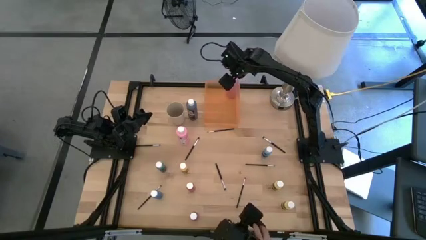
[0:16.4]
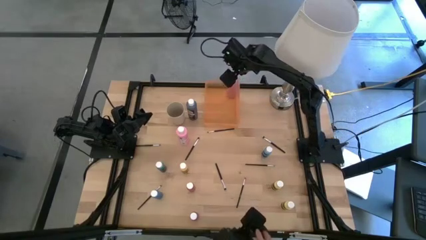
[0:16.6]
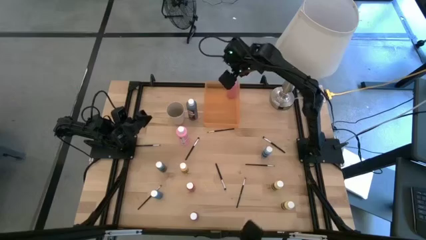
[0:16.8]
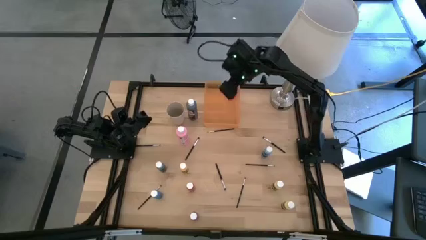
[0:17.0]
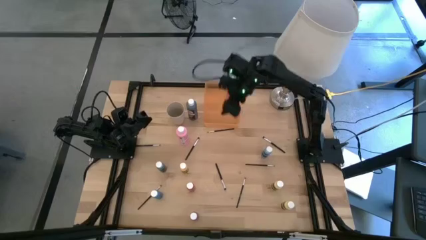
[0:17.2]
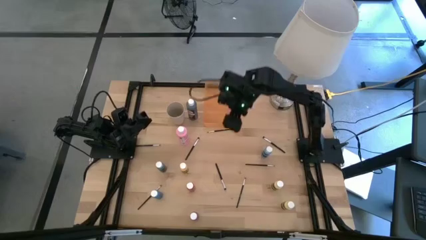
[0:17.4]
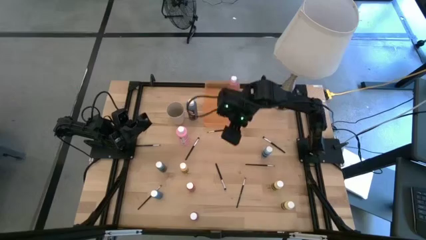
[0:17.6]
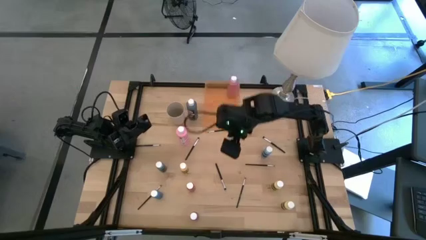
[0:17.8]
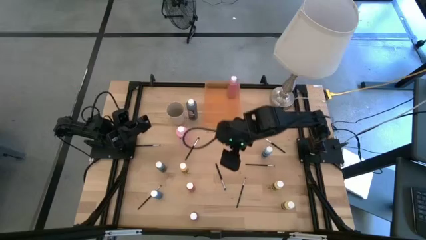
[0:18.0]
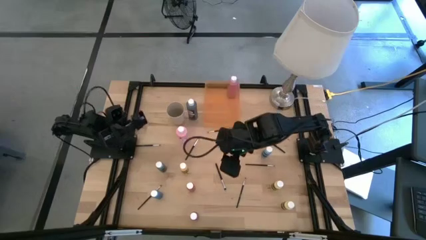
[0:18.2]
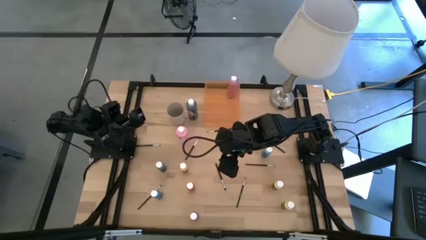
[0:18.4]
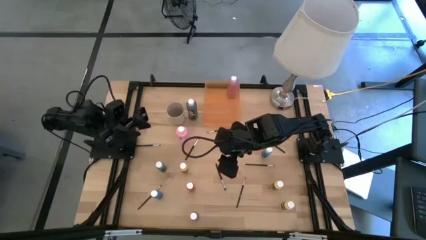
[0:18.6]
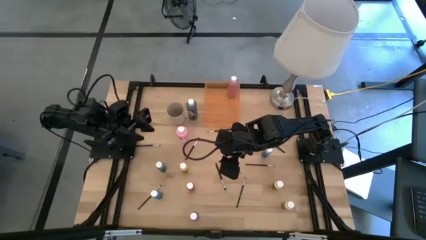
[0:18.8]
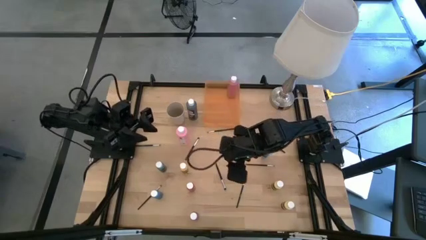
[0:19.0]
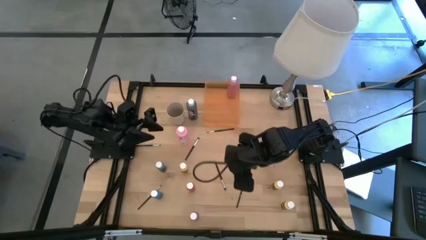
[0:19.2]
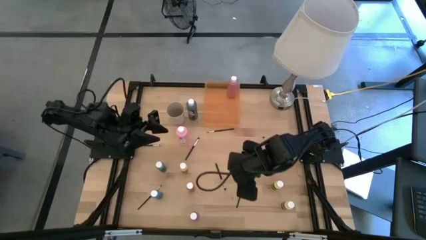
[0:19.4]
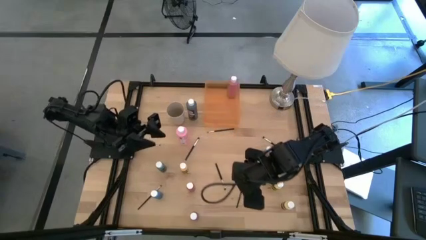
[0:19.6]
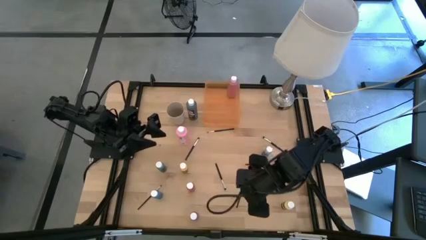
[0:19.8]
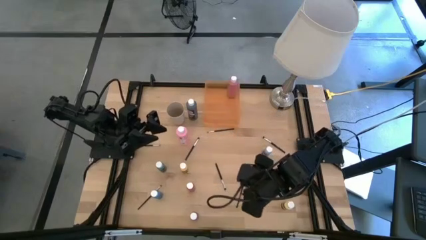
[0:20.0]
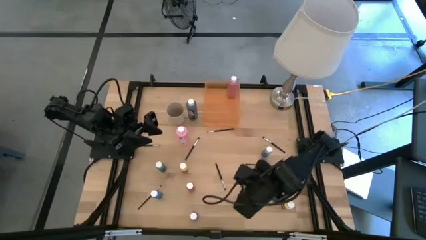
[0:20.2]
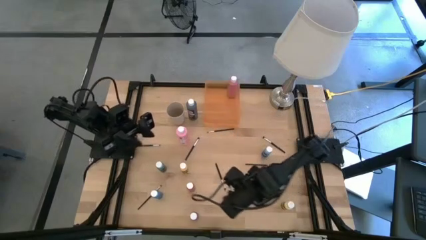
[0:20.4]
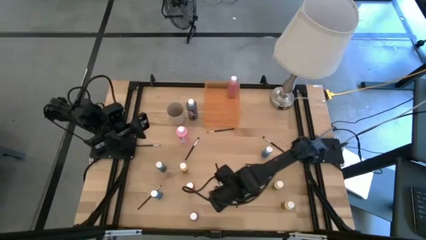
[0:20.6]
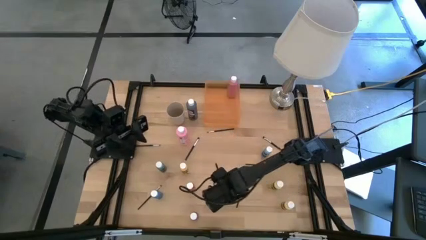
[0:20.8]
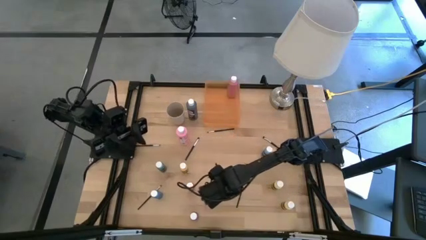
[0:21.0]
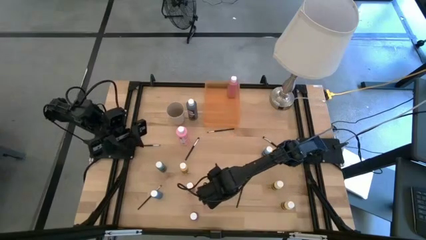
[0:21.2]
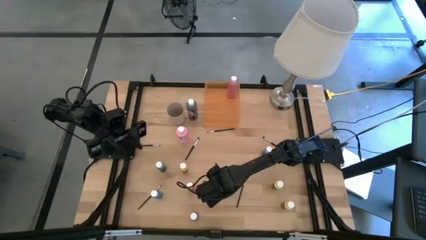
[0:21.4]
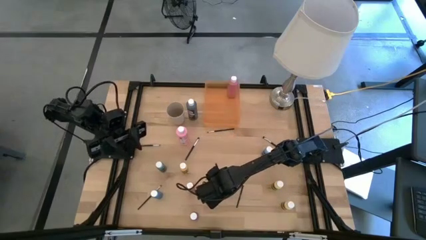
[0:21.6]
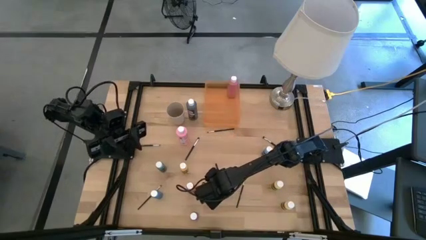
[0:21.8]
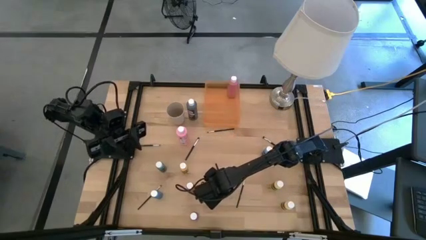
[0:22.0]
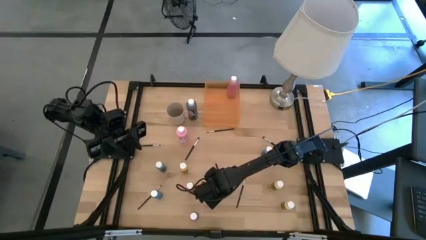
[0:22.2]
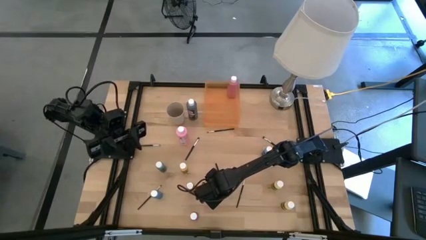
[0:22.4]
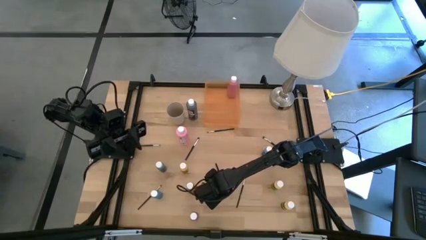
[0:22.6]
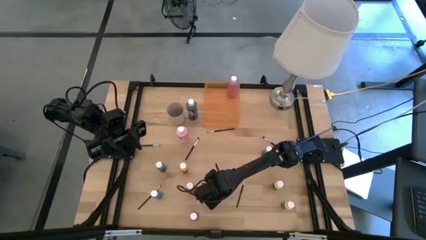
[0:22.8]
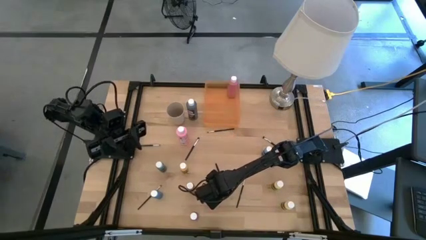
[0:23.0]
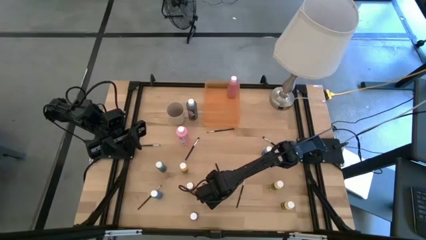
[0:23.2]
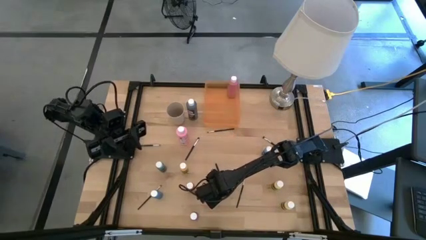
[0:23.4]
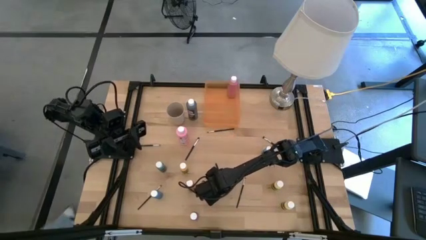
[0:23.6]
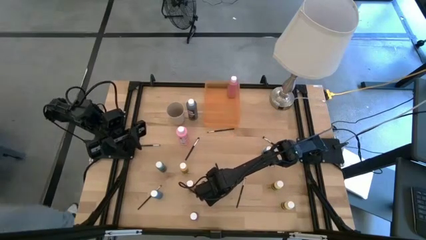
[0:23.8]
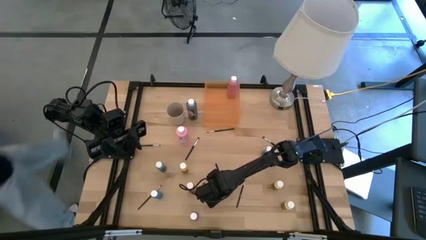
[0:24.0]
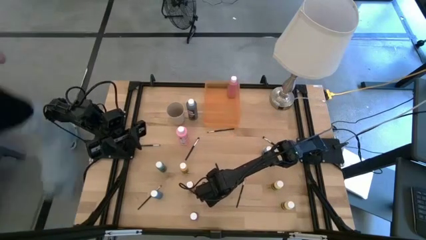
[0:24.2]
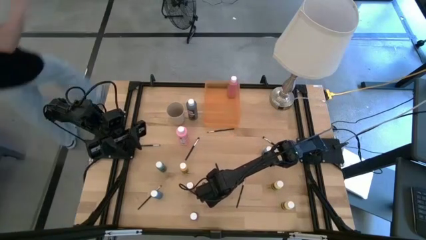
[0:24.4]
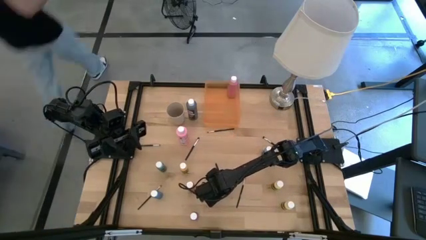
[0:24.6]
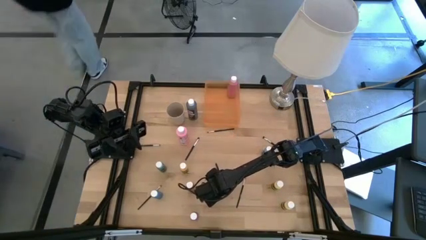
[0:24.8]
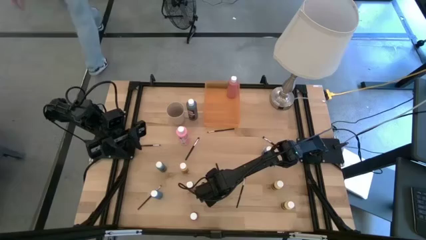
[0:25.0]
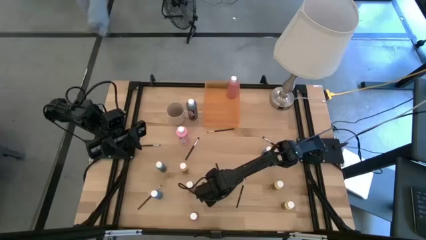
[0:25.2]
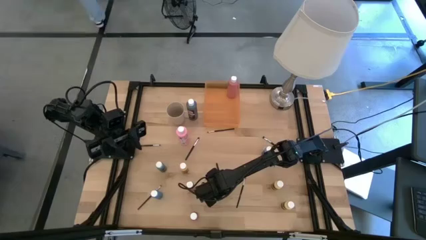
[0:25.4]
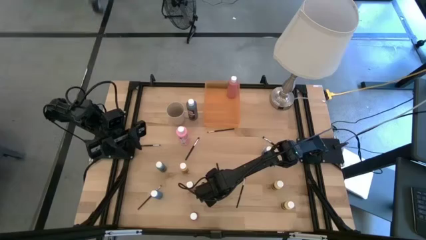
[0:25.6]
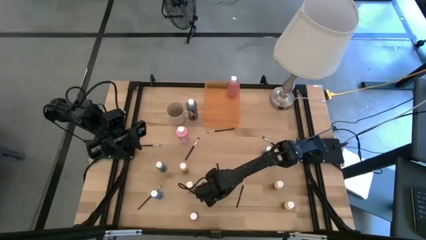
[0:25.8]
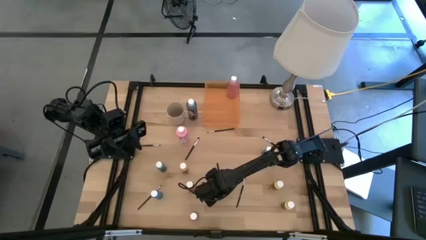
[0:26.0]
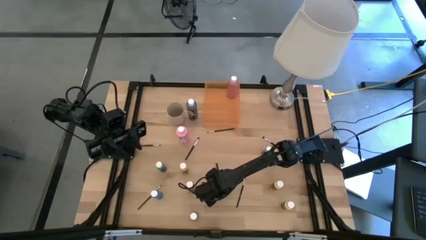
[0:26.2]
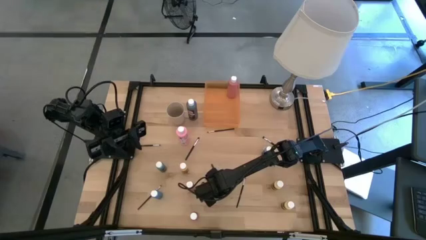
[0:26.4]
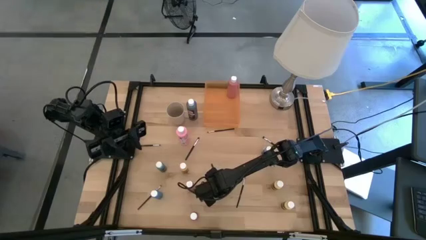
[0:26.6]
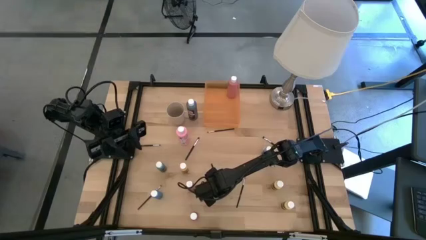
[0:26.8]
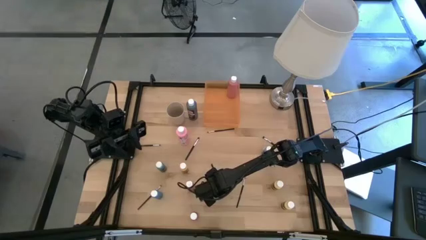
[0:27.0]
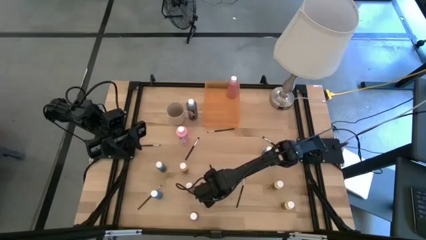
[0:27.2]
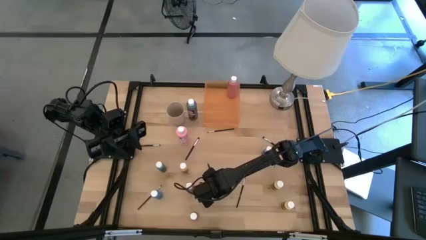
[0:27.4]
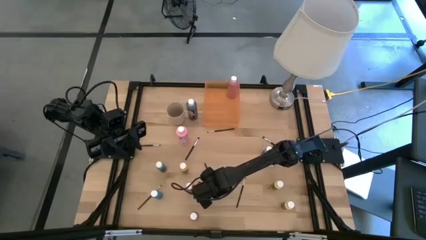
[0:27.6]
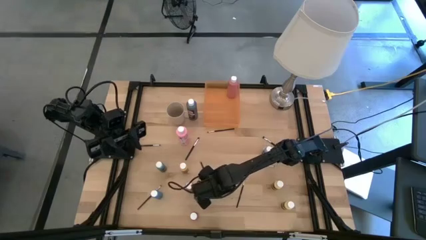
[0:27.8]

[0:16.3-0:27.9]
Task: Pick & Place Paint Supplies
Put the black paint brush into the white cup

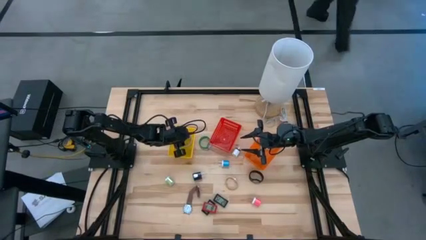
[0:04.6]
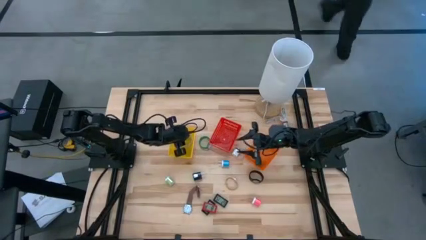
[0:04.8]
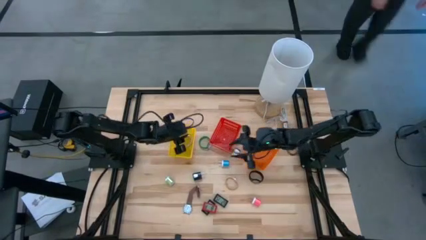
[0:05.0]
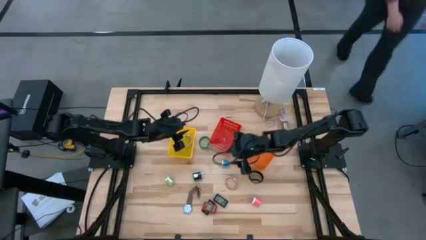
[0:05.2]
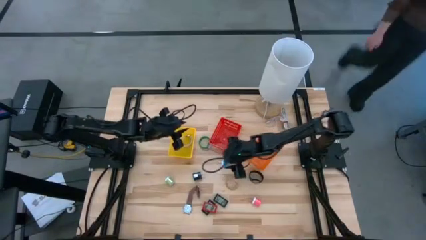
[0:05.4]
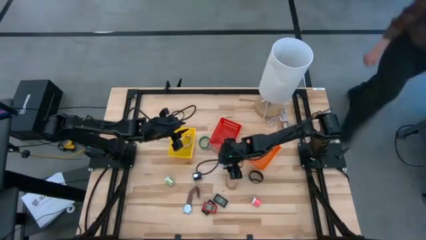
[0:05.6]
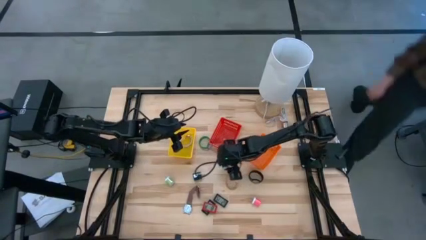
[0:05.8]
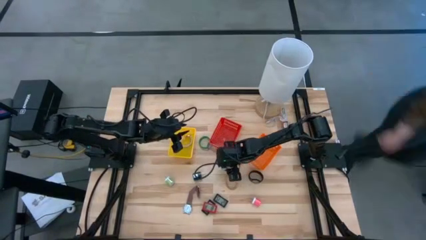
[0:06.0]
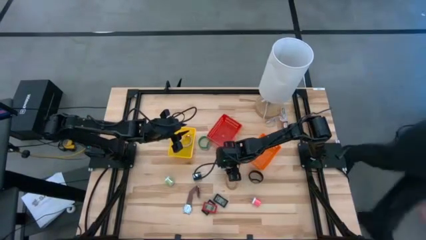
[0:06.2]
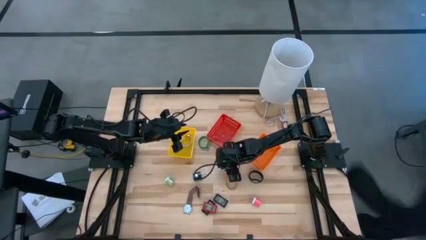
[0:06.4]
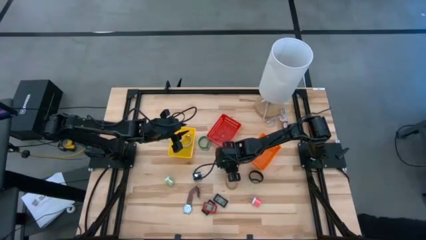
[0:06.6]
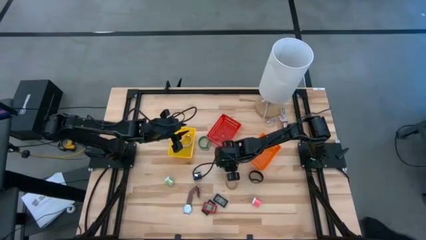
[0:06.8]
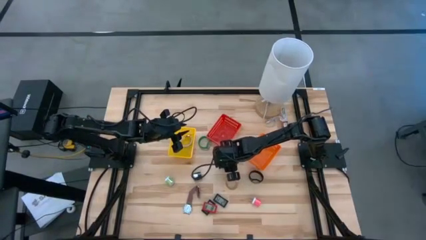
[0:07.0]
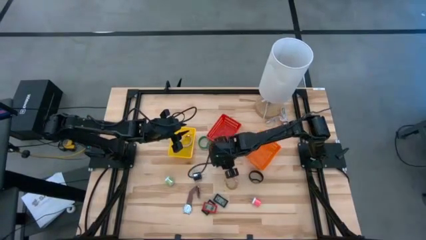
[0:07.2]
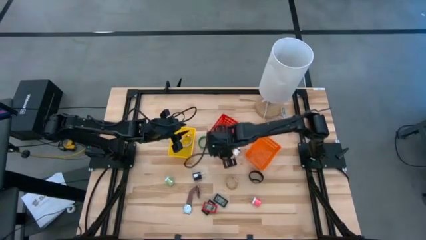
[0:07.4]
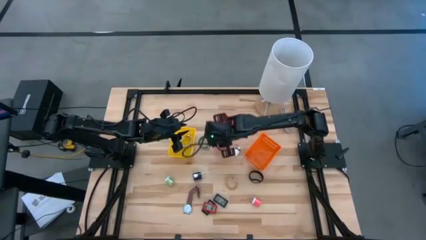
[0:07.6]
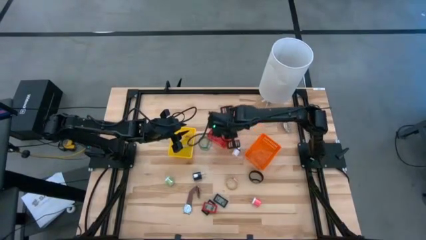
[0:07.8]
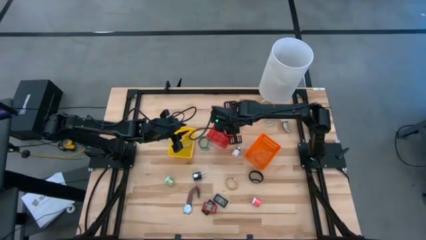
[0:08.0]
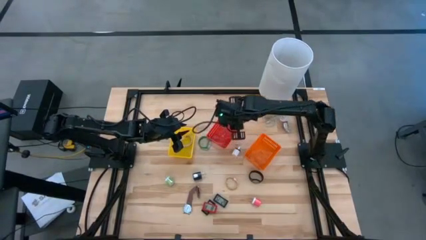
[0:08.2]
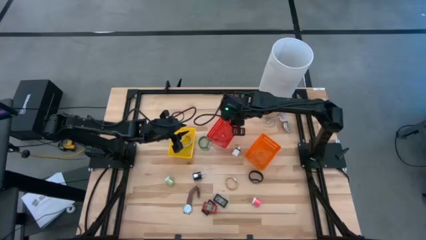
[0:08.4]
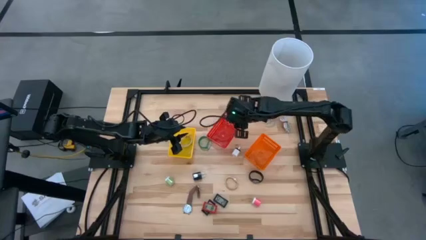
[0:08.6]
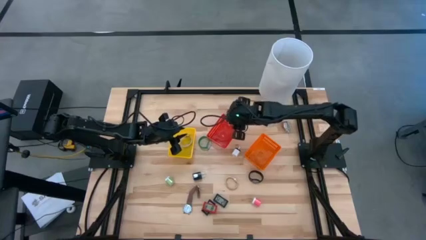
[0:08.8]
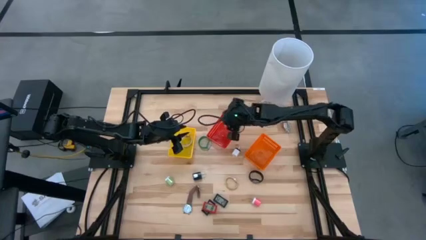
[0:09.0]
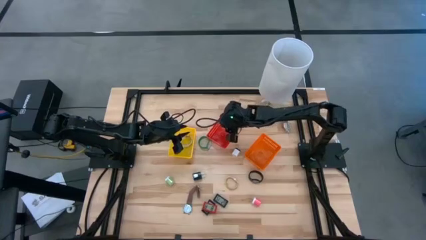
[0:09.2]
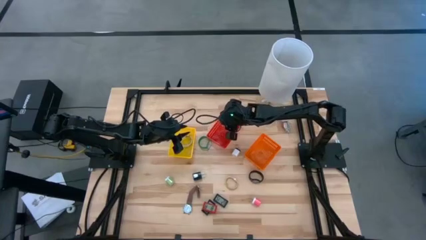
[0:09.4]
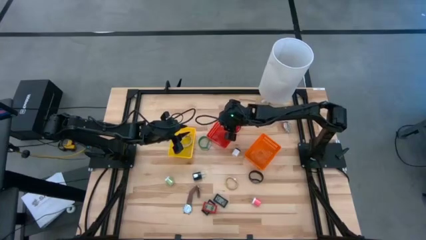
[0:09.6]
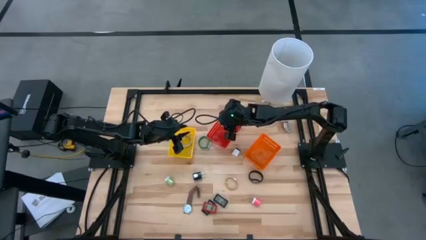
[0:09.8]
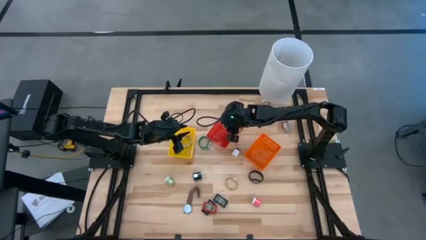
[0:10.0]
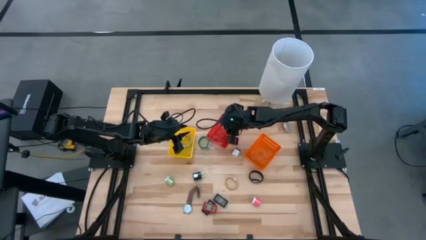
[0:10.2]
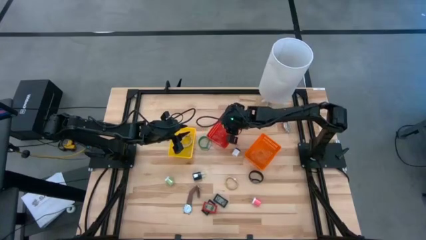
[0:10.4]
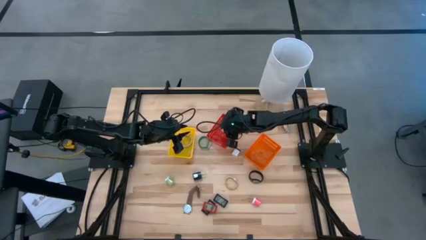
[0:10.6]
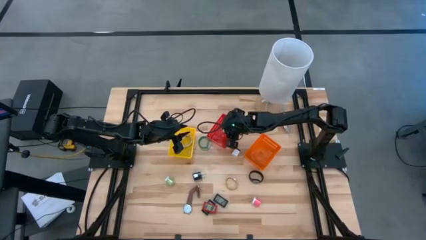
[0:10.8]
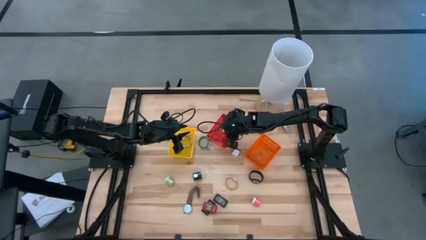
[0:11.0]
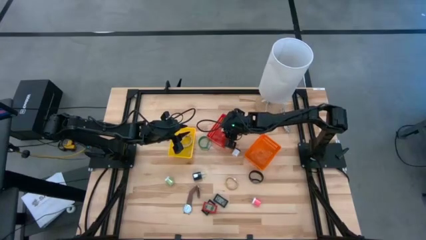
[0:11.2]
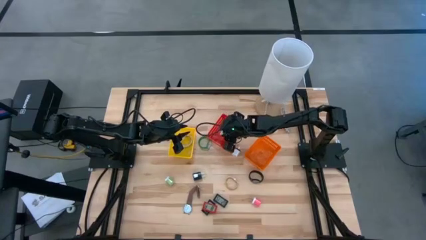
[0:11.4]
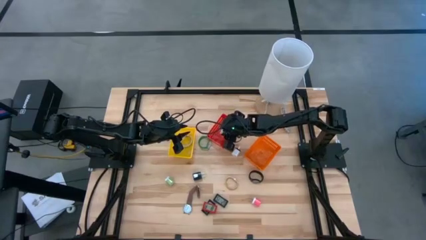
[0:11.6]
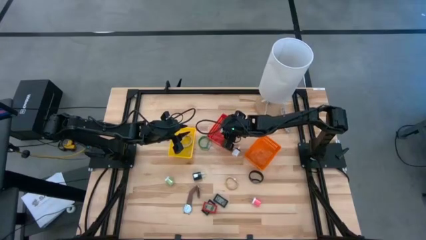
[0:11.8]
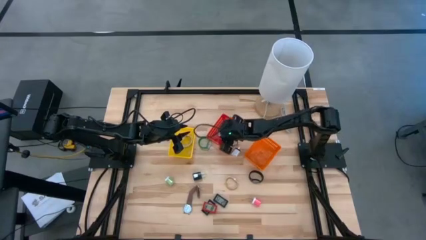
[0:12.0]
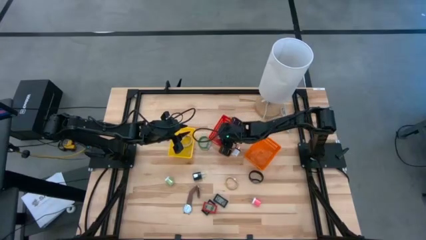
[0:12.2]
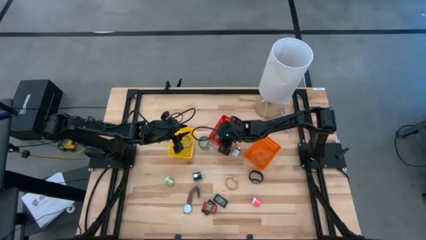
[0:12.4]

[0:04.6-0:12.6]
Task: Pick & Place Office items
Put the blue charger adapter into the red bin
